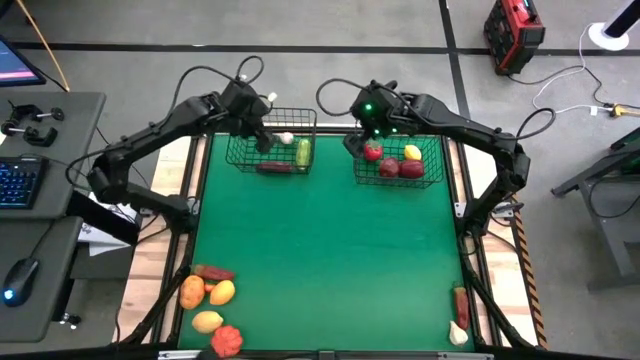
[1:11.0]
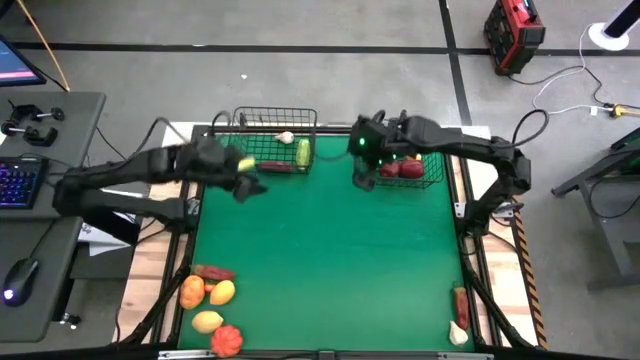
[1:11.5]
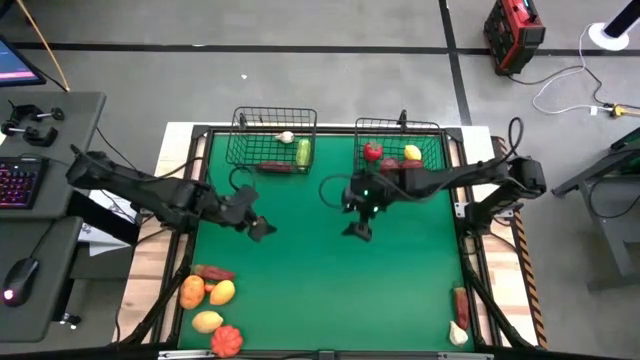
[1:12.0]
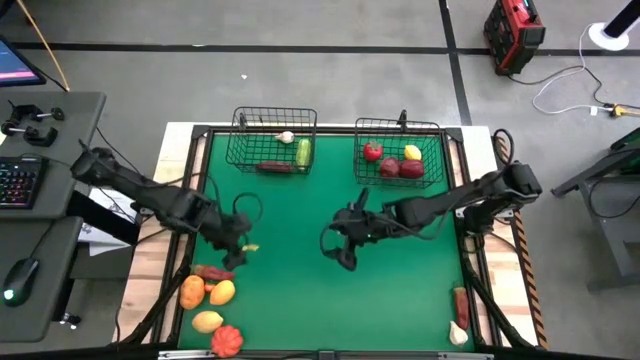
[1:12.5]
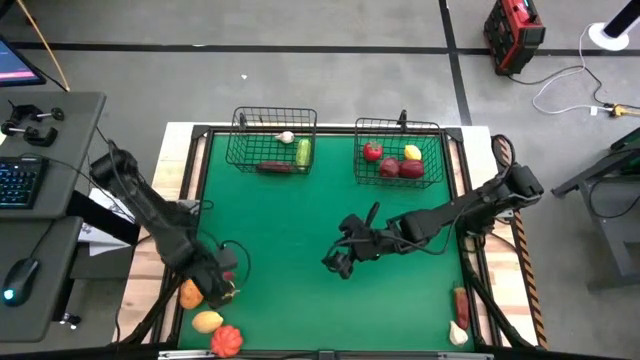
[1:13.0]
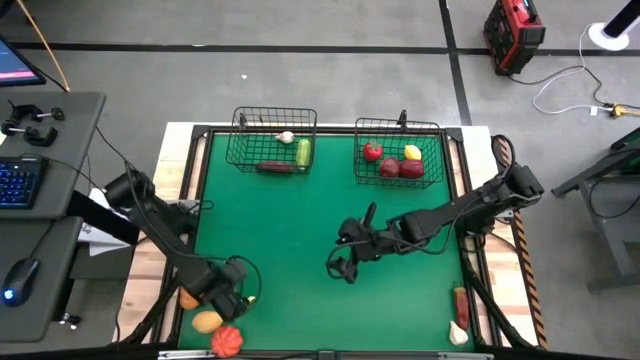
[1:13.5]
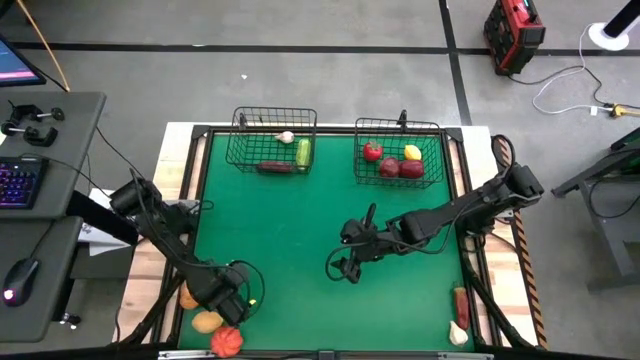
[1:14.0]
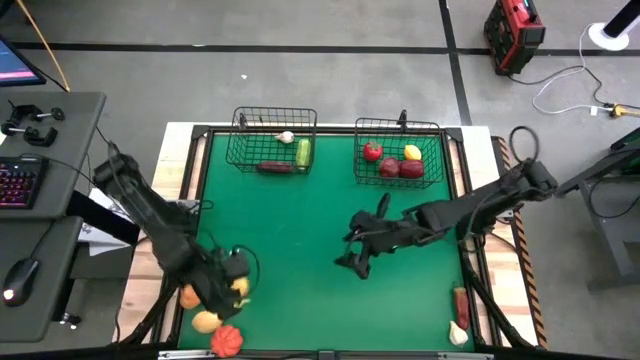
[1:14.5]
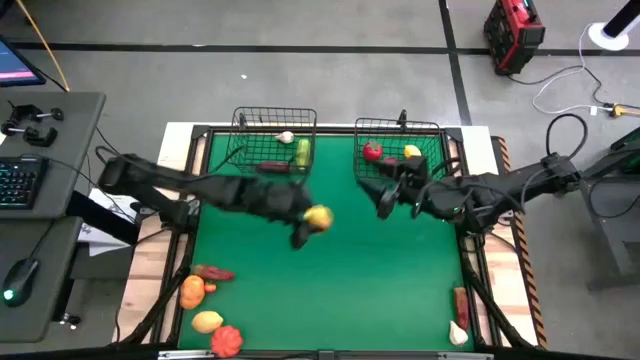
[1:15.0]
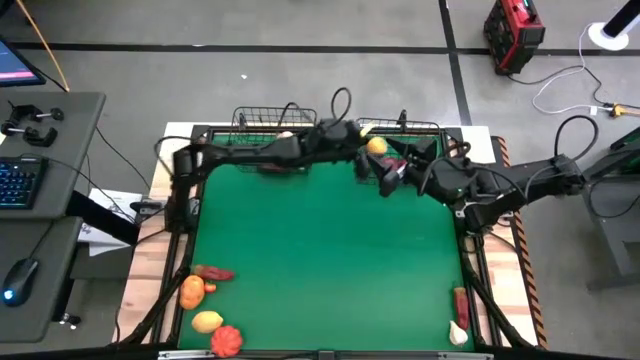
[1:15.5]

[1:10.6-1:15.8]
Task: Sort produce into baskets
Put the top yellow lemon into the right wire basket

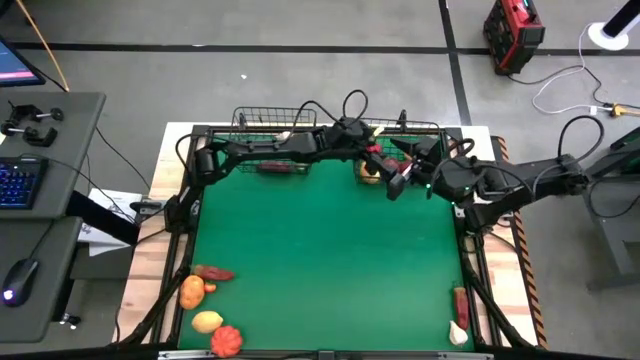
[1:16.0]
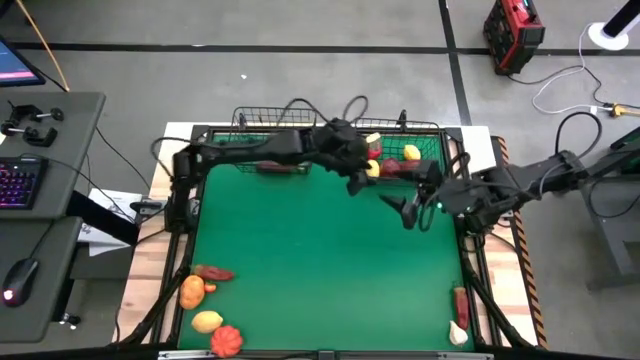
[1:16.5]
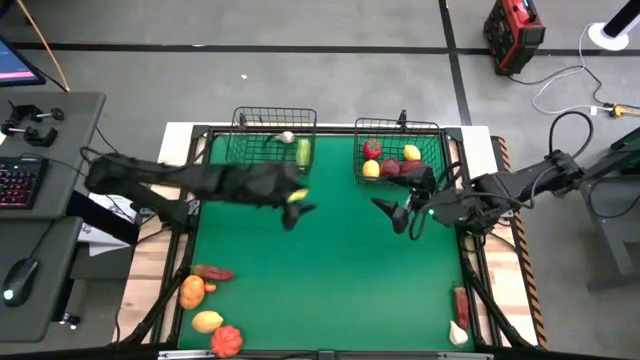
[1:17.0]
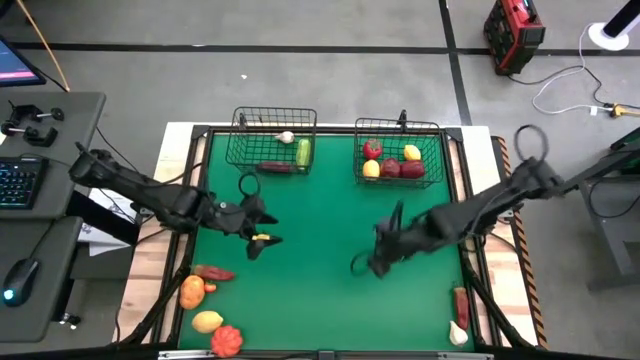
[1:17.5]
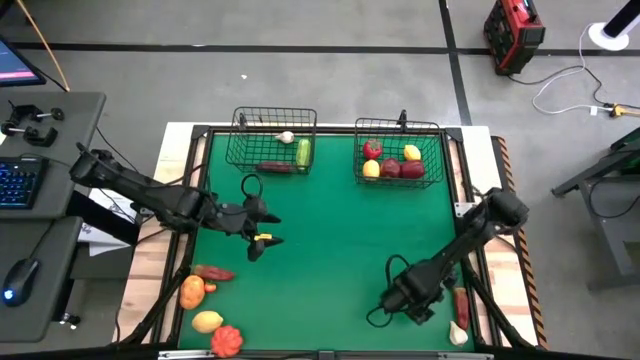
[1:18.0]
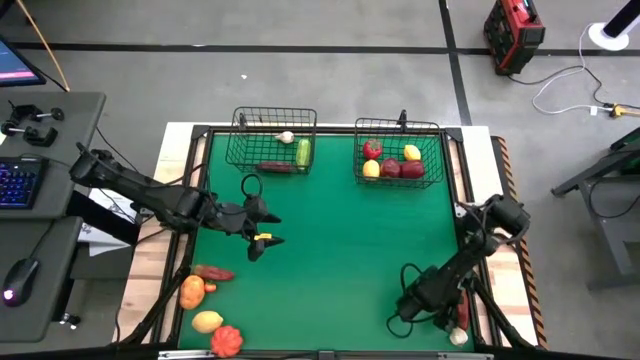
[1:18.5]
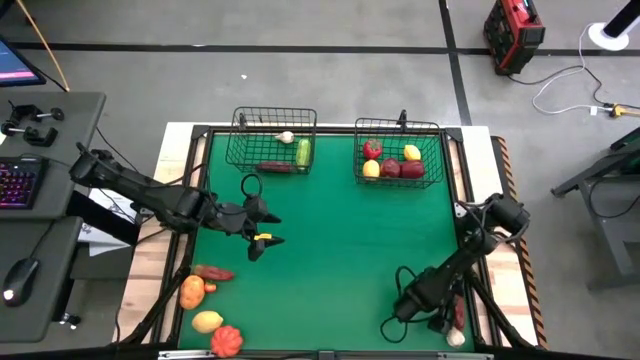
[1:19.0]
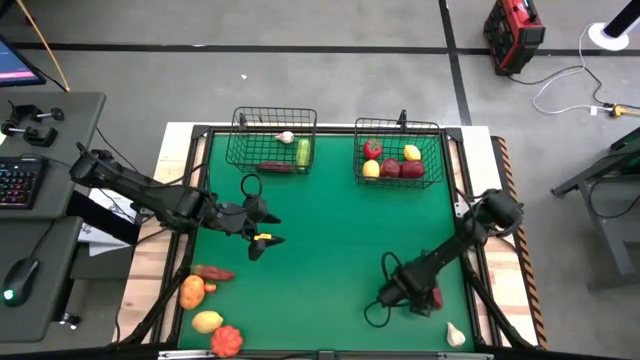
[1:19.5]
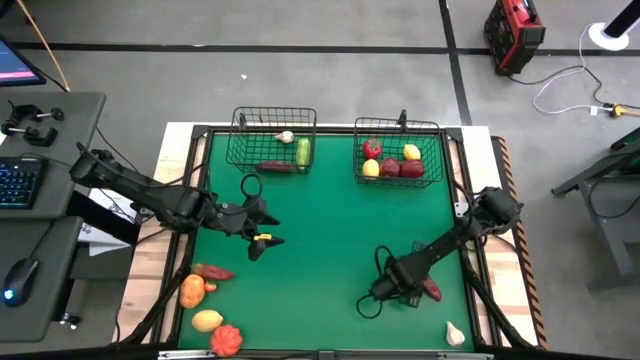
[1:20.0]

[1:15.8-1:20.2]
Put the right red chili pepper into the left wire basket

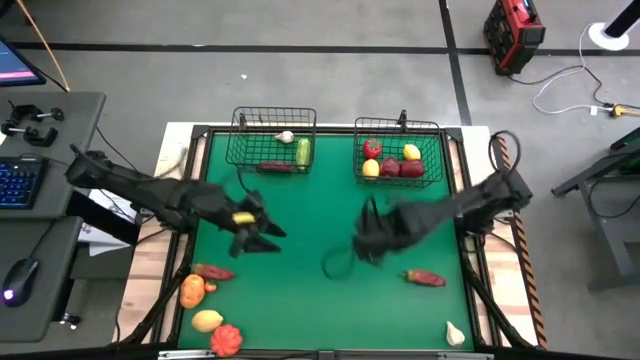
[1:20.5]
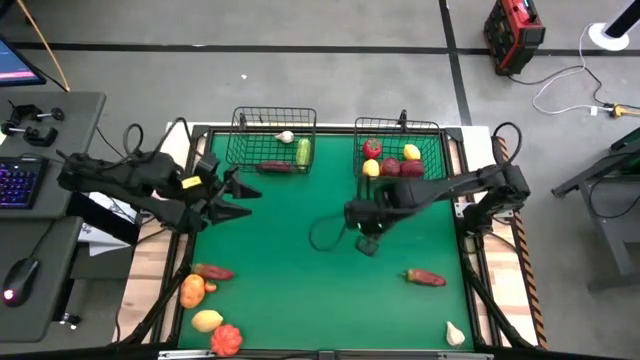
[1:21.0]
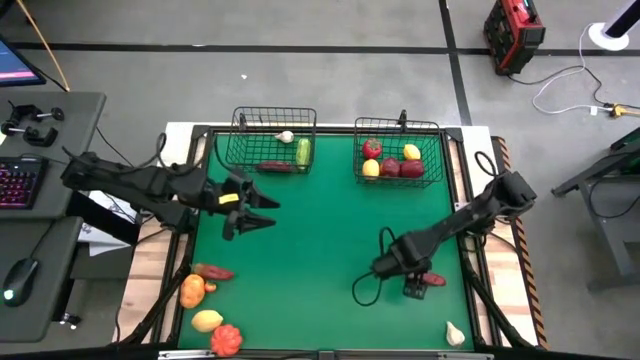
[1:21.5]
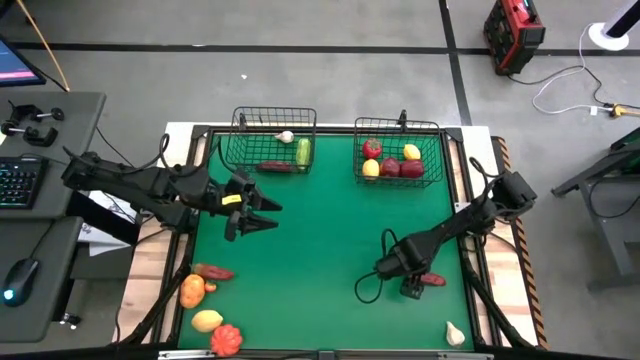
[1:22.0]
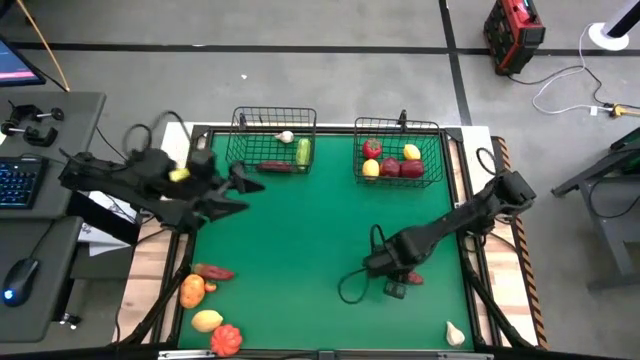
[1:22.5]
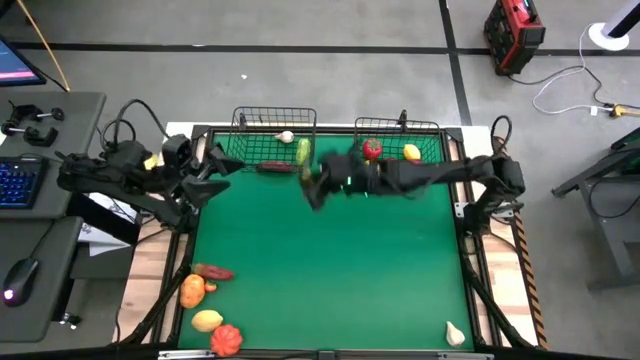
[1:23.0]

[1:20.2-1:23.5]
Put the right red chili pepper into the left wire basket

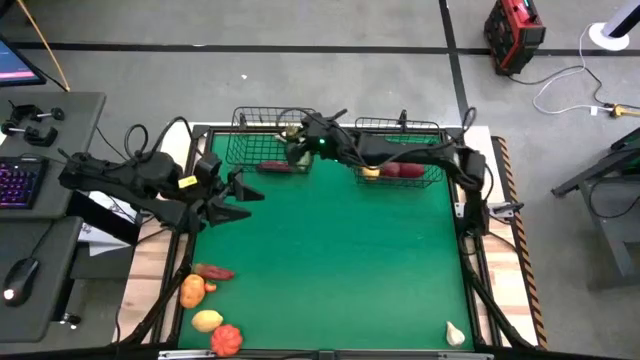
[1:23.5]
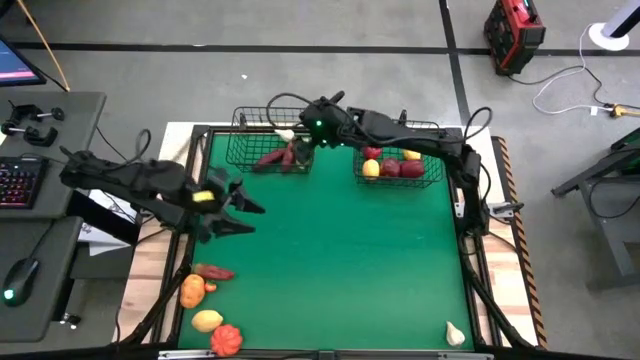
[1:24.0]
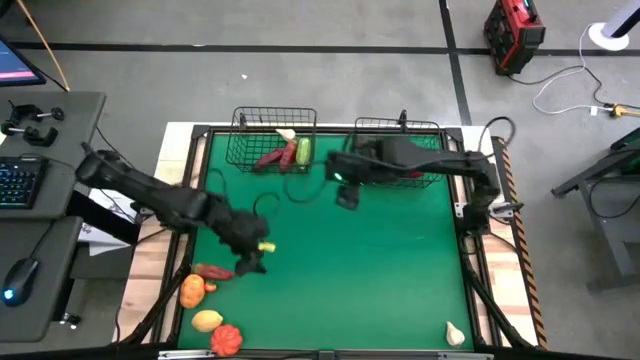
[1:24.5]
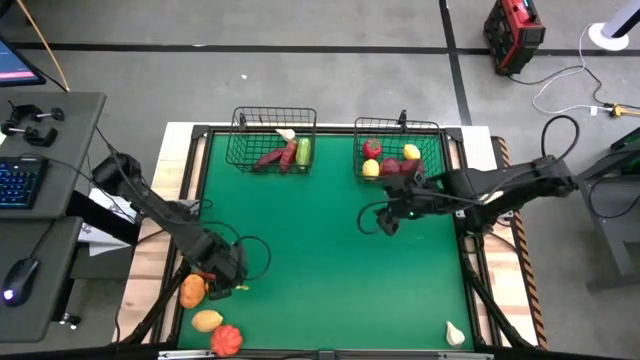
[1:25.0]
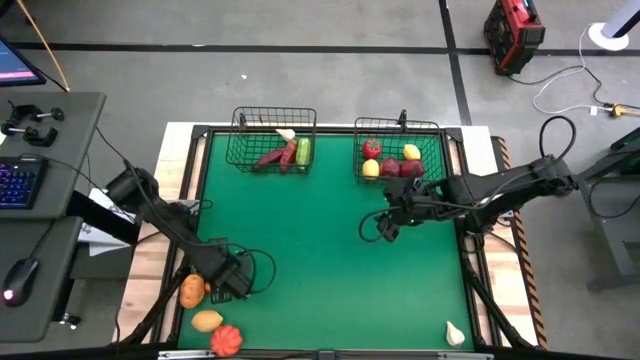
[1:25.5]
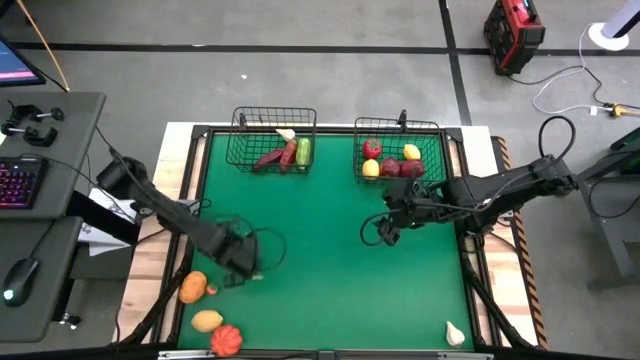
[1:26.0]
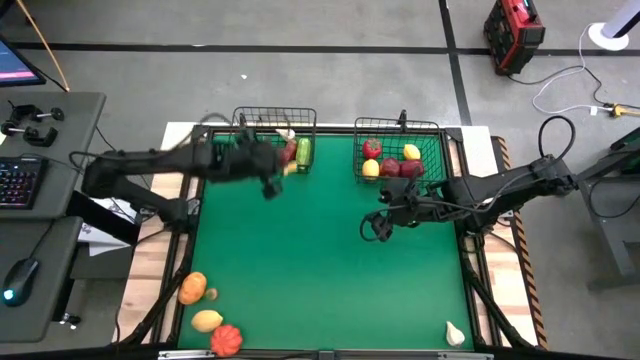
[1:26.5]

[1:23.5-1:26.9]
Put the red chili pepper into the left wire basket

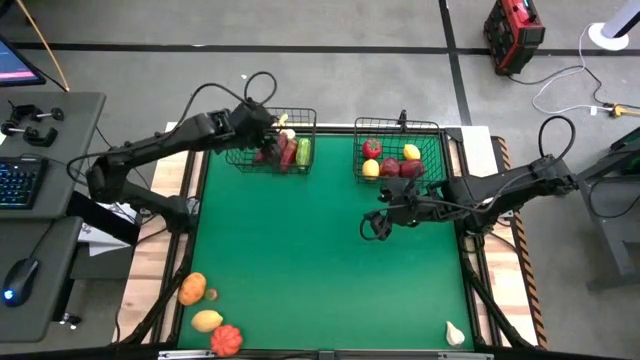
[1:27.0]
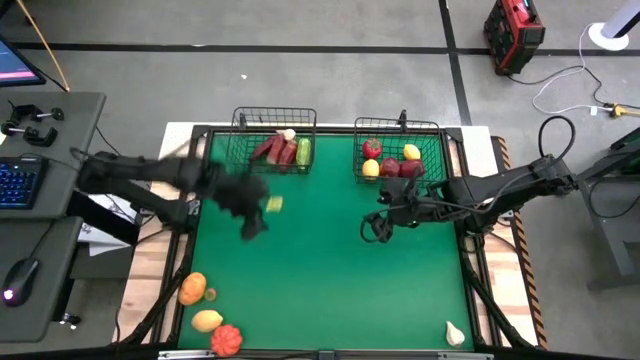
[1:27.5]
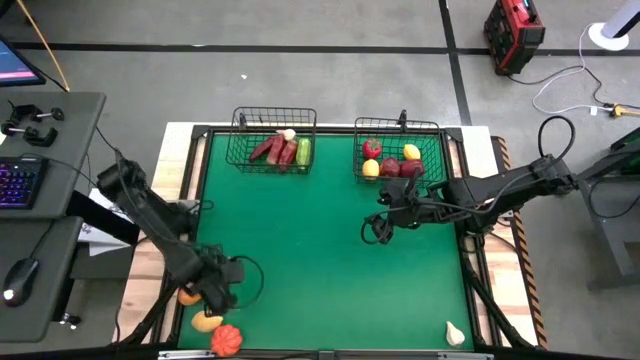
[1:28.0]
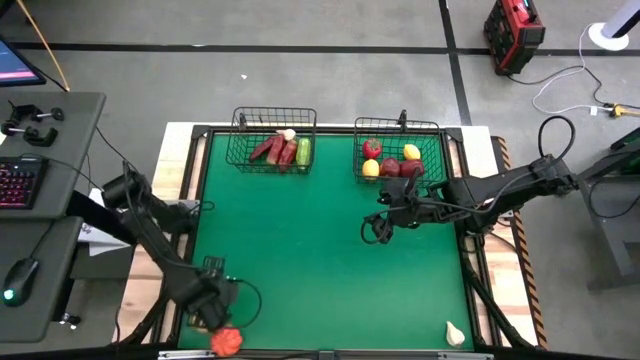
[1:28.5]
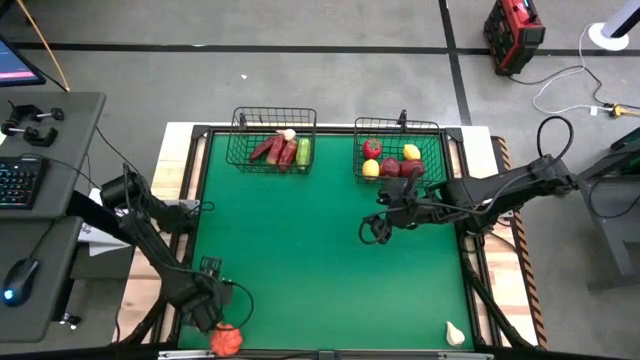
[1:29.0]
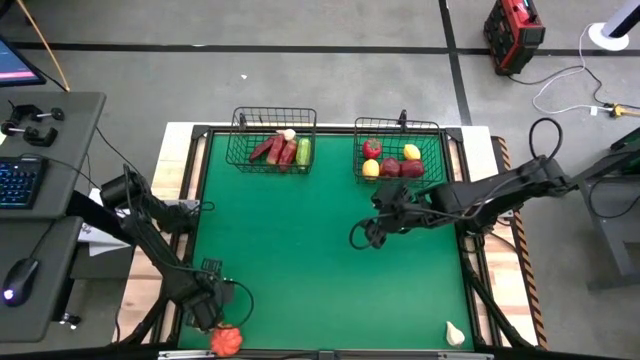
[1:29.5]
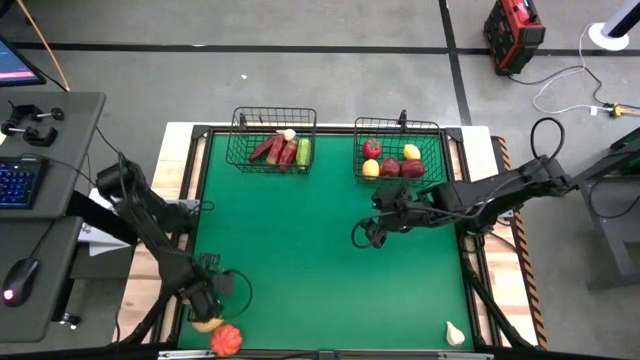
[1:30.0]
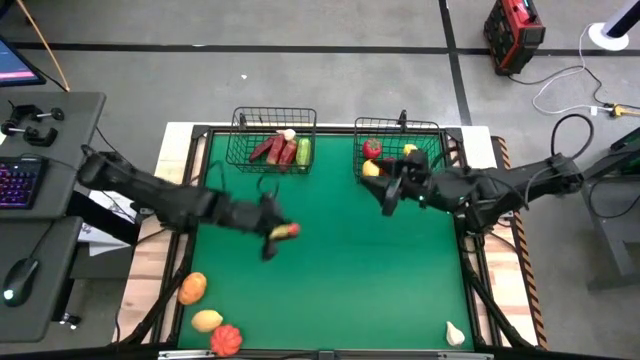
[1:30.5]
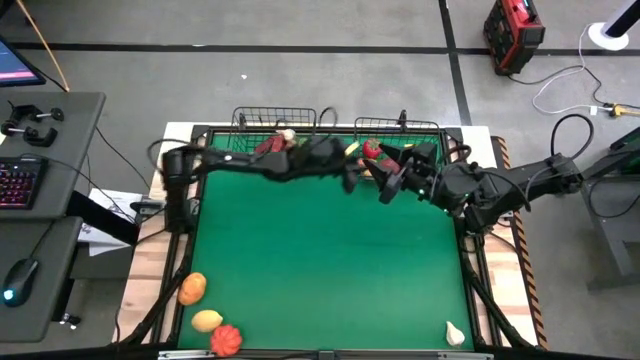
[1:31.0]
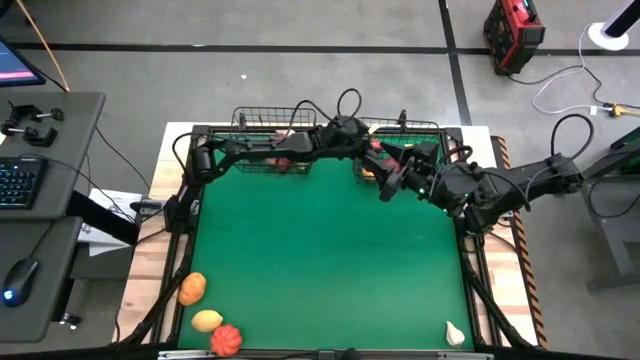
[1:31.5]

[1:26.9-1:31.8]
Put the orange tomato into the right wire basket
